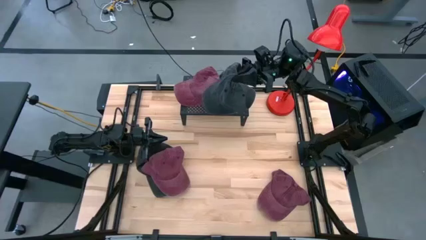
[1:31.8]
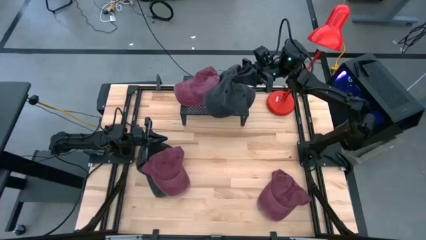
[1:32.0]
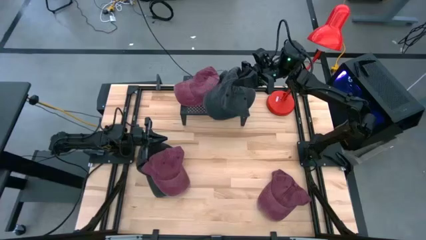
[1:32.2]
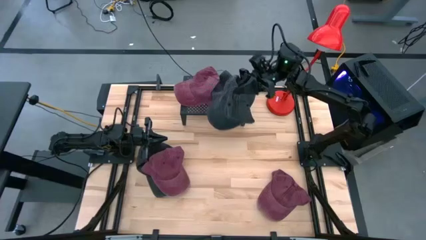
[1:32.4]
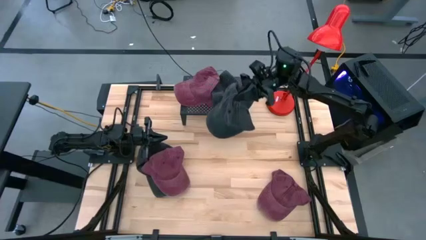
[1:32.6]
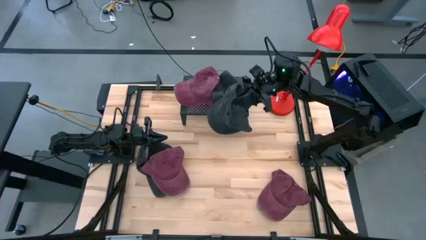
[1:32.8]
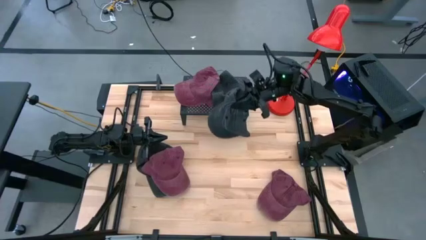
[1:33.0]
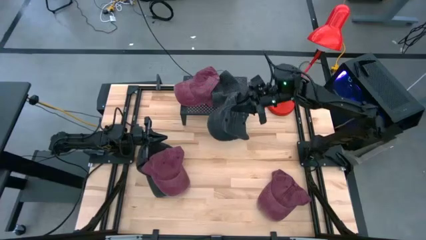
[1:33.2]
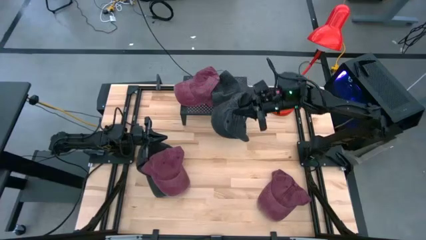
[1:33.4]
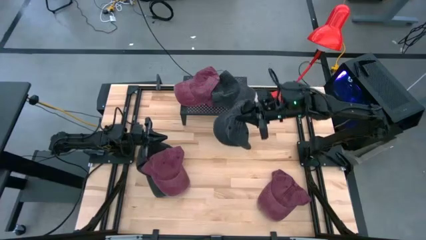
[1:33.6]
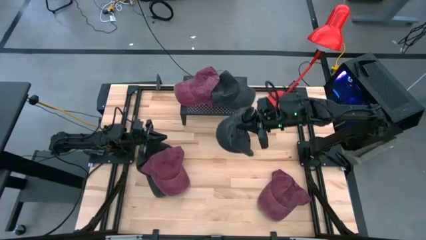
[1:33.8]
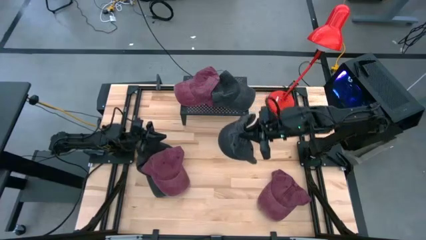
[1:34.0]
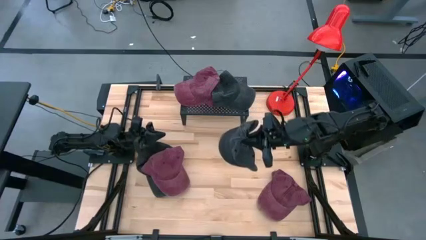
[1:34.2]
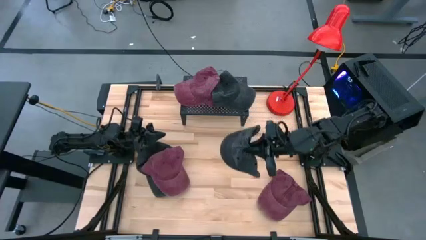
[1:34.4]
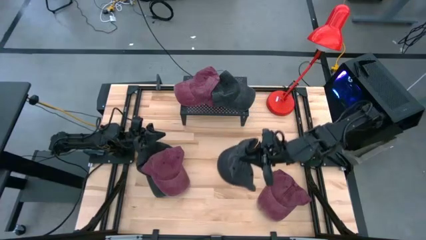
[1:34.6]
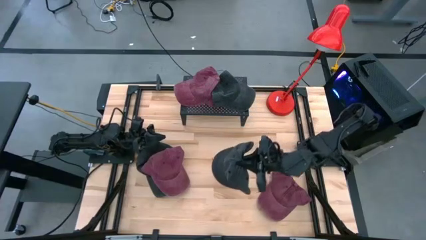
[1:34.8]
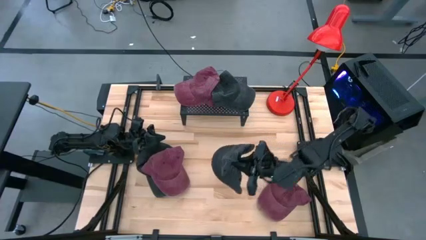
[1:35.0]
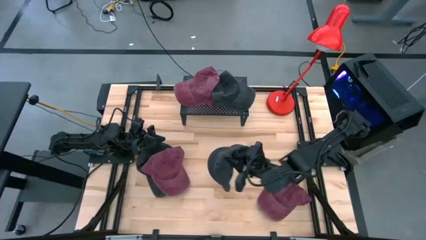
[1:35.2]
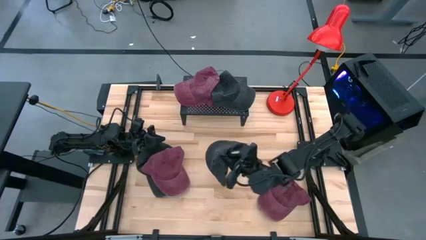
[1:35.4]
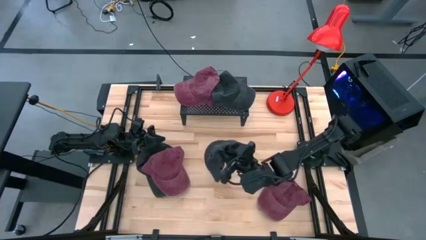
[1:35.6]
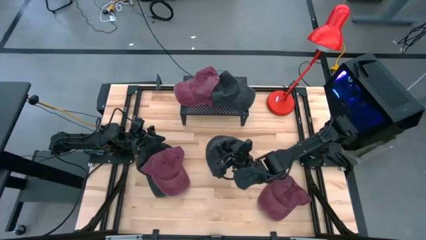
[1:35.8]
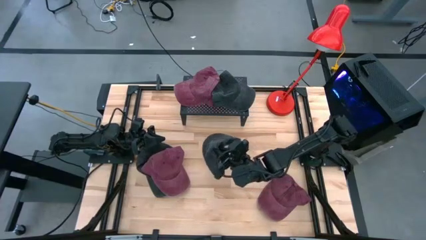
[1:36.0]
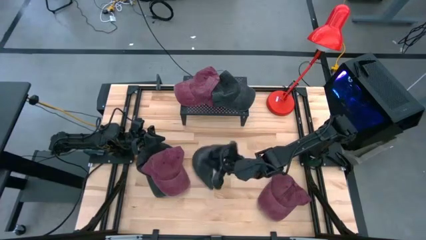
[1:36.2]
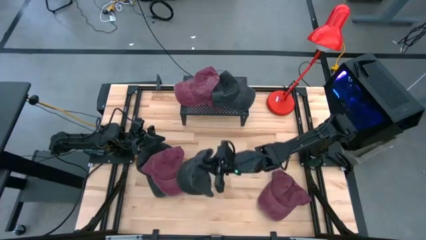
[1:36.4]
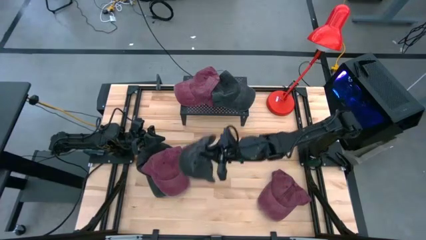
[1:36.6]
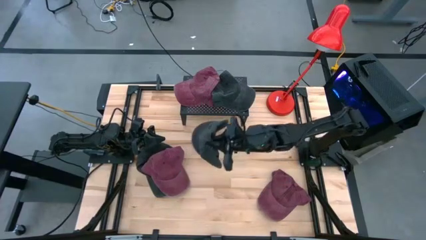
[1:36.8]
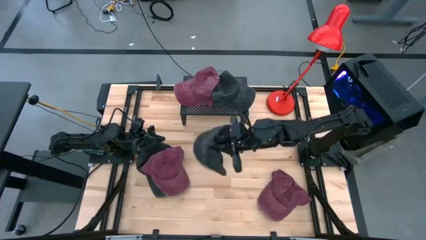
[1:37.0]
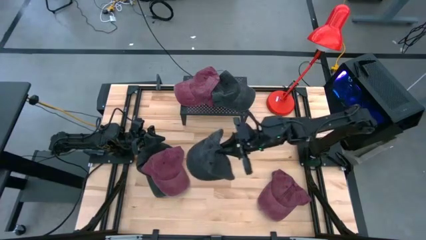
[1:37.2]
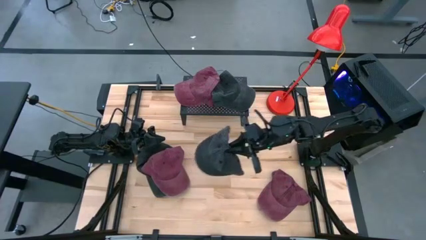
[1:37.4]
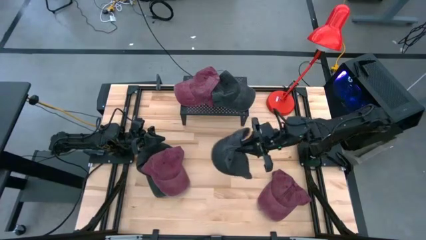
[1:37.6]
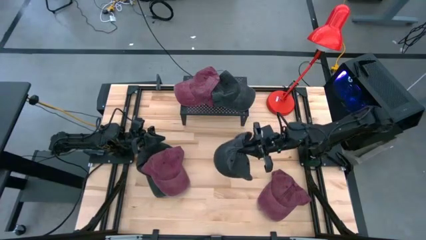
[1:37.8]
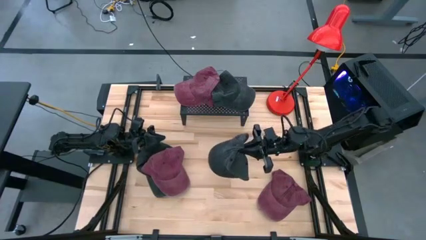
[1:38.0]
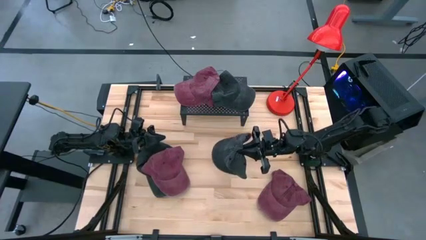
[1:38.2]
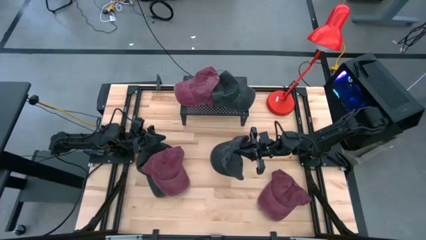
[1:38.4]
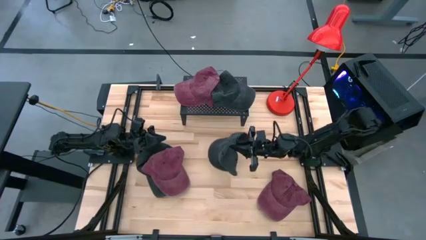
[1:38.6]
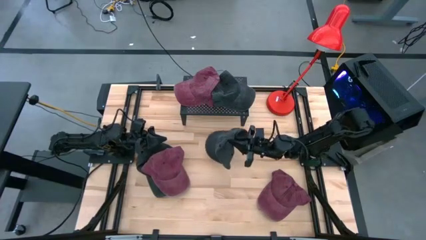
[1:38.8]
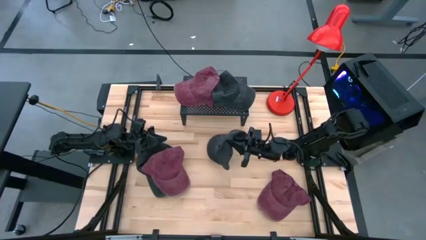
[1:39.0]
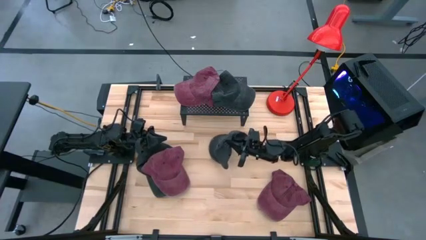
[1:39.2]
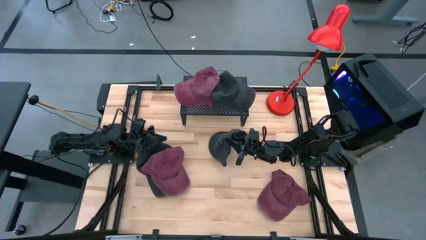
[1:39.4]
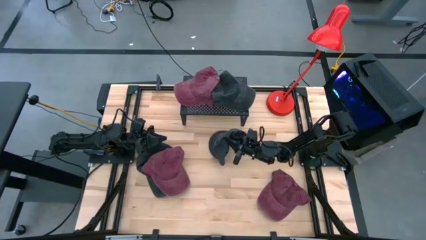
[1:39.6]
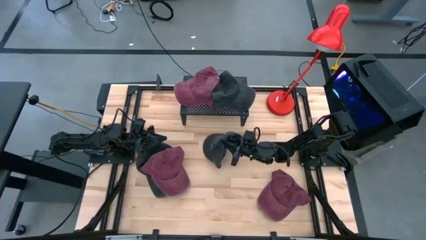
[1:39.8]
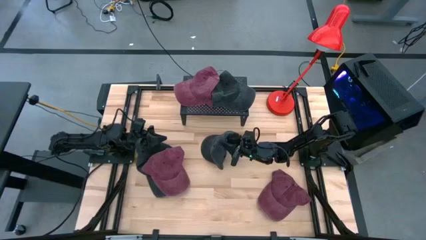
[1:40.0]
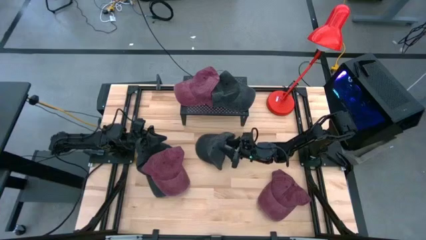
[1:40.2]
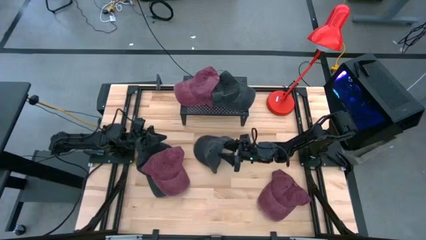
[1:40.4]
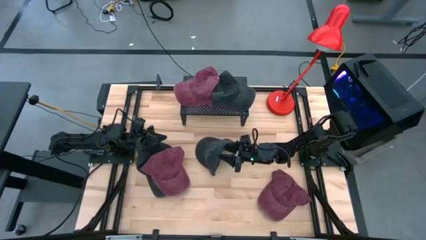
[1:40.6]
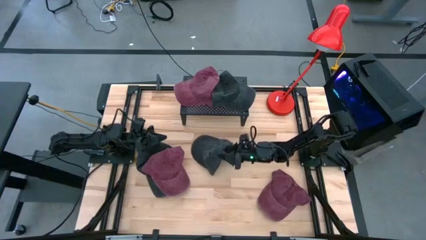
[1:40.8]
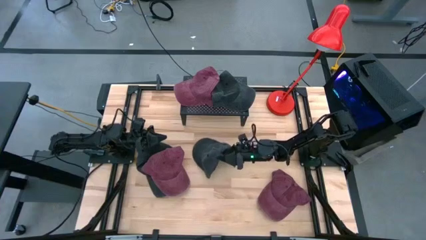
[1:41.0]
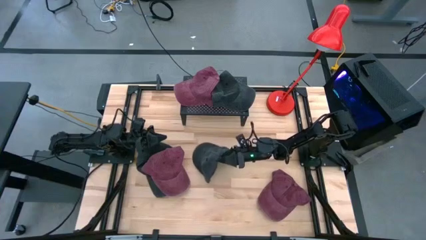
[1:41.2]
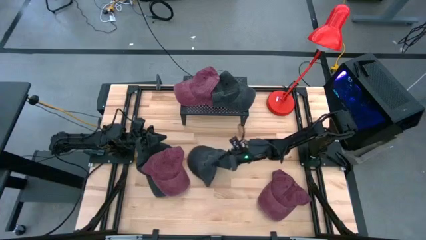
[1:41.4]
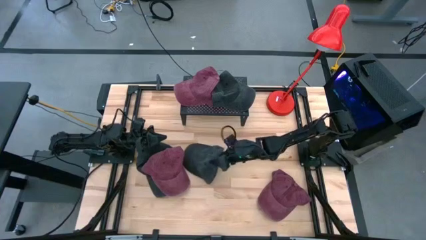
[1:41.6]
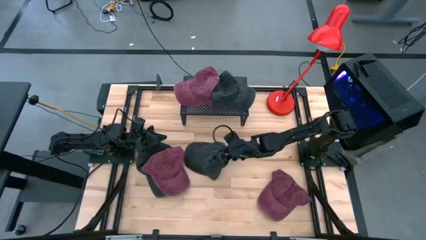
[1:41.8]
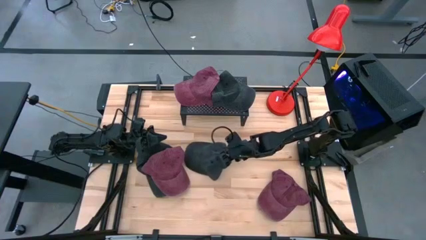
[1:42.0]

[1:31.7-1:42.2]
Task: Pick & Place hat
Move the right black cap

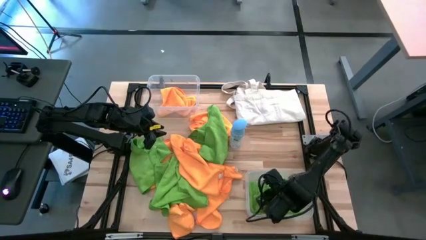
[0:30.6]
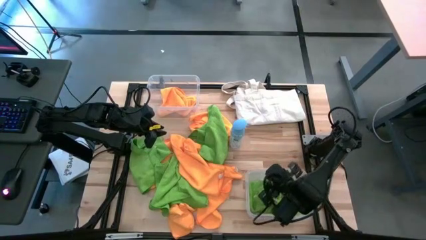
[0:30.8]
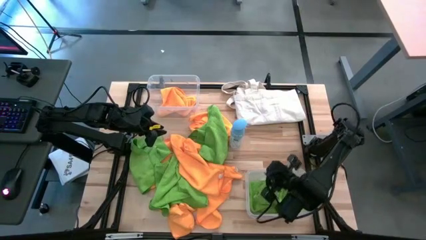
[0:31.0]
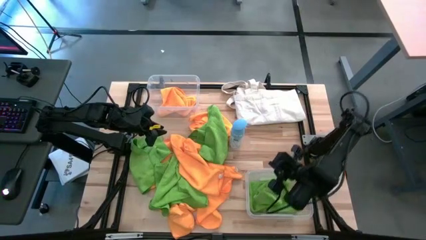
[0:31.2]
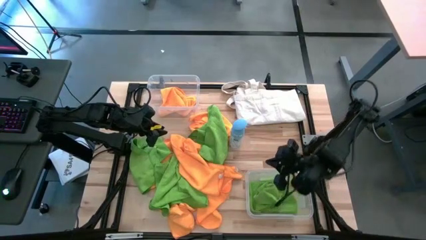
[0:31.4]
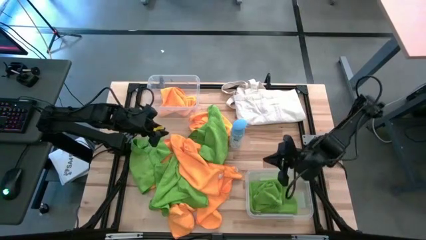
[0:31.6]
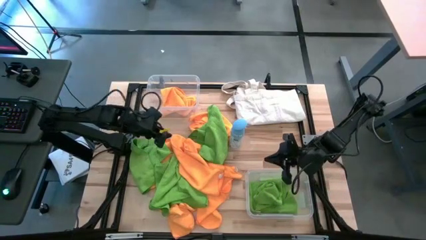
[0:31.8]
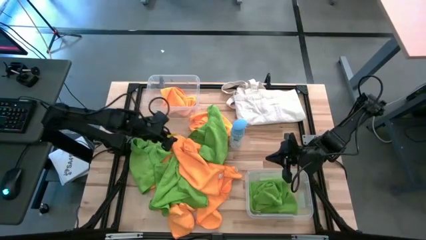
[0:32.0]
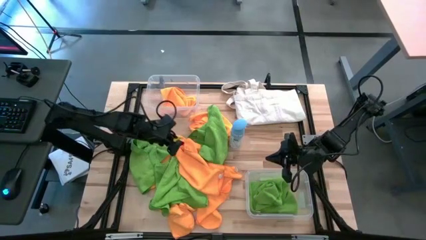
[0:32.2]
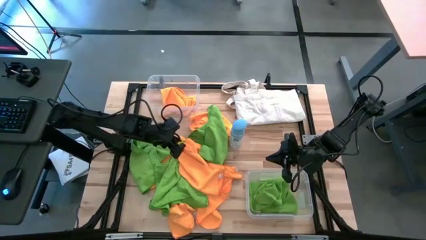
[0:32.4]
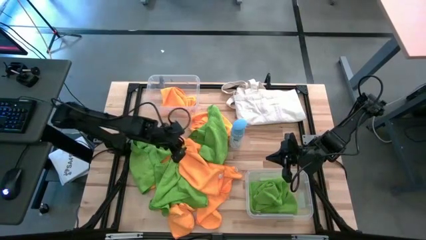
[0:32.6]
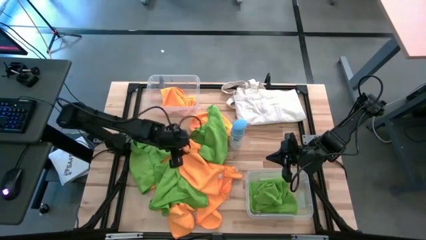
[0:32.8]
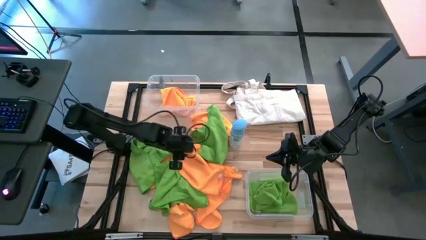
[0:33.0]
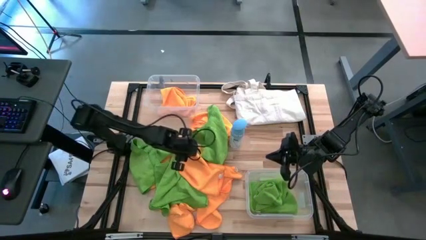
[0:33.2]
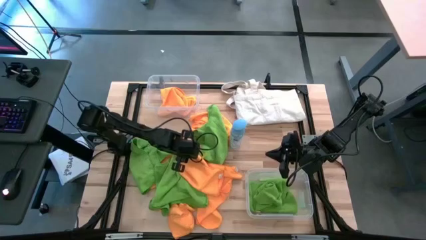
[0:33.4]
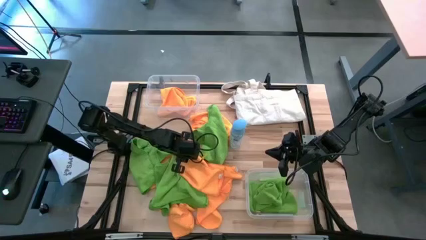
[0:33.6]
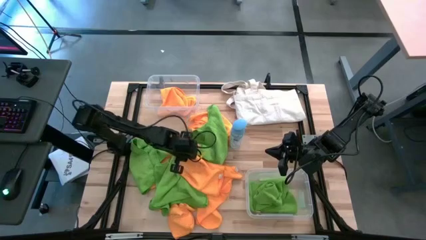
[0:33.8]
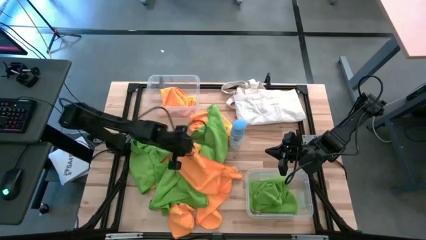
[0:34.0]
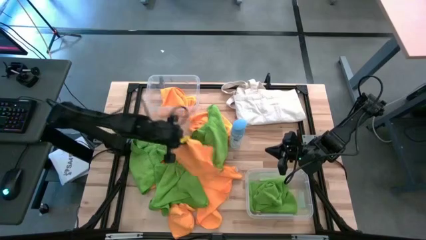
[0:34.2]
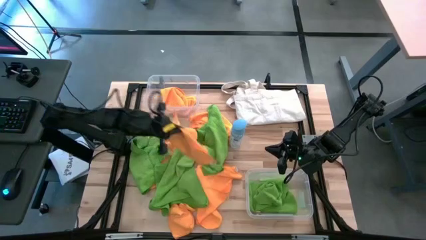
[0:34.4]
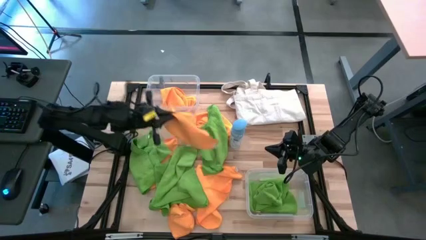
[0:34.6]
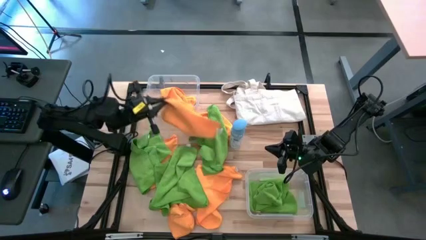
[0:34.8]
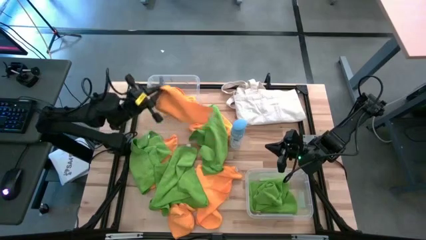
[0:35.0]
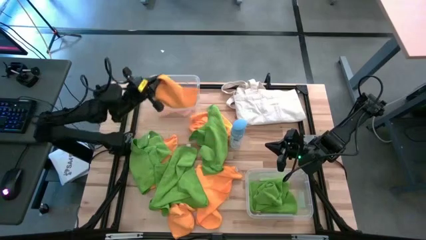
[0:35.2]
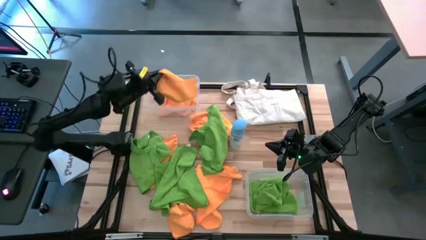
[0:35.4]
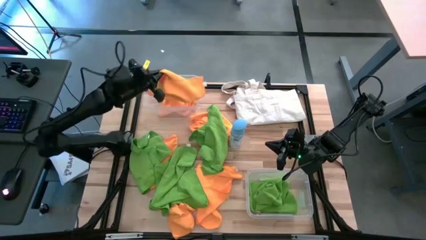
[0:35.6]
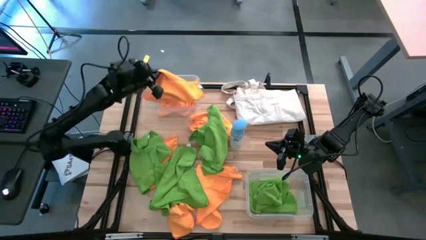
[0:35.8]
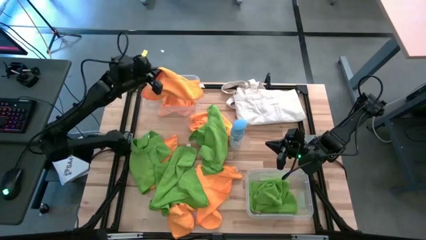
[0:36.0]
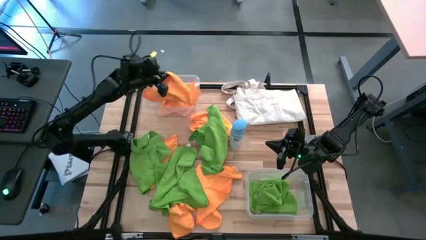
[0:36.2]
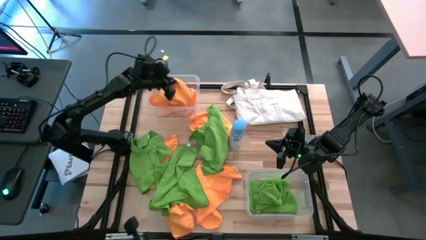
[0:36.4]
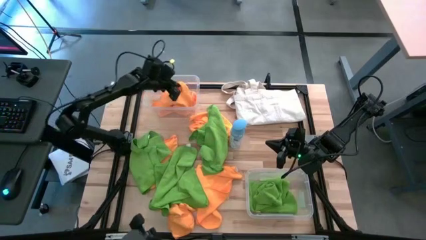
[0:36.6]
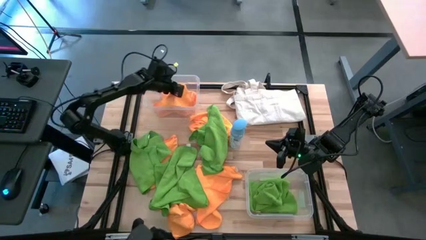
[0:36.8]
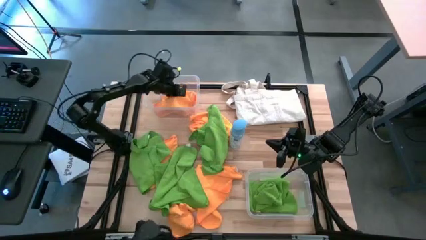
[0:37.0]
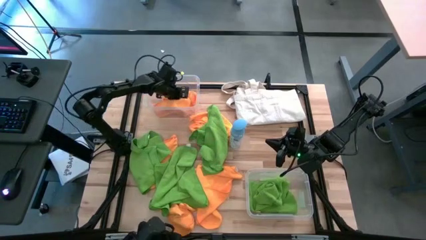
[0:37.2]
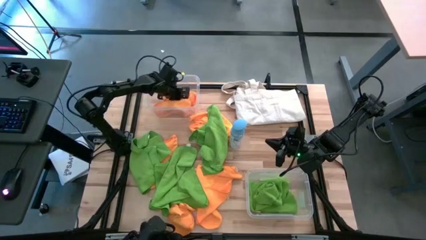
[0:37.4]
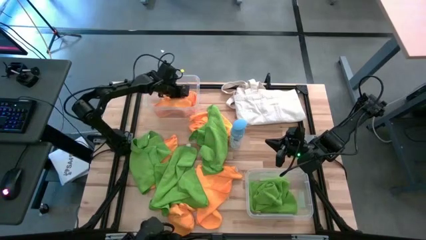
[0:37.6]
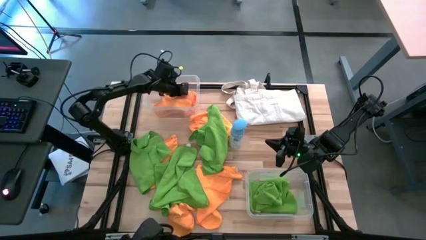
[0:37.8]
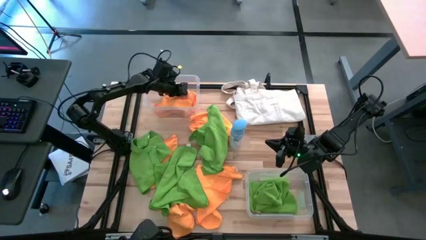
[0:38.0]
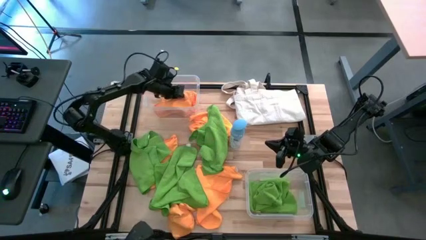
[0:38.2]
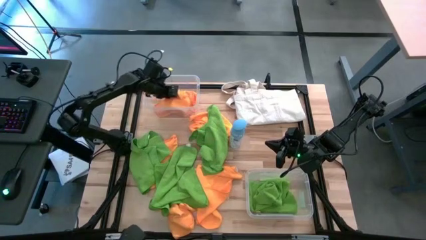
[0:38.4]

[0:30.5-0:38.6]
Task: Sort microfiber towel by color & place in baskets
Put the yellow microfiber towel into the top transparent bin
